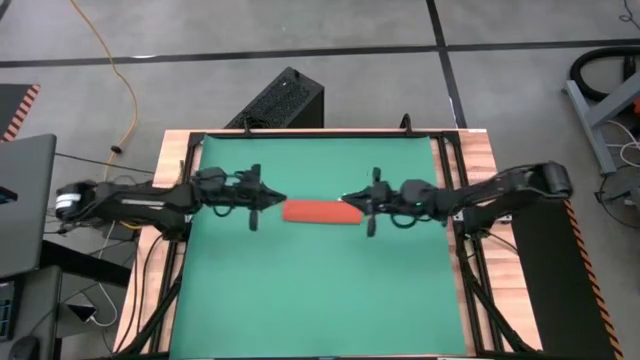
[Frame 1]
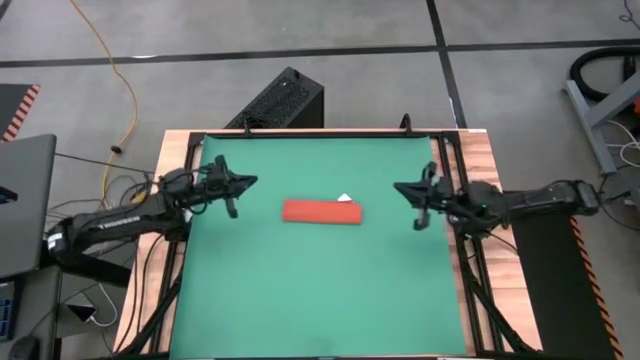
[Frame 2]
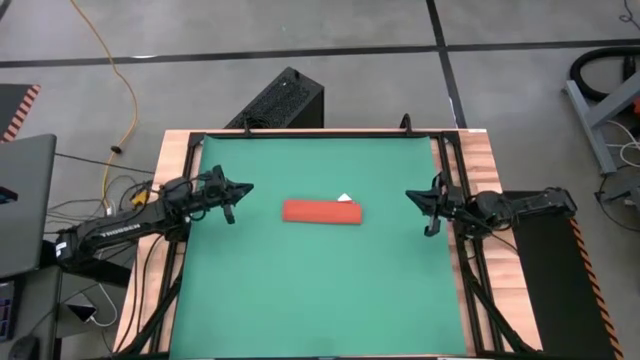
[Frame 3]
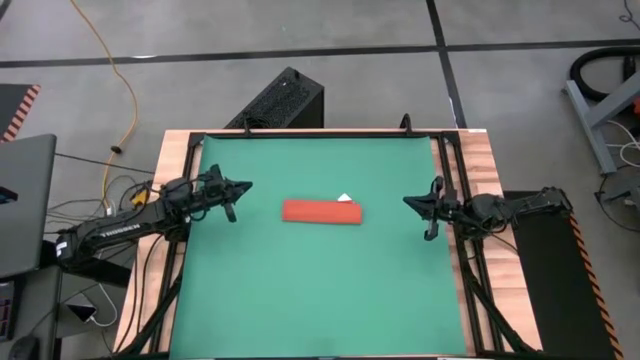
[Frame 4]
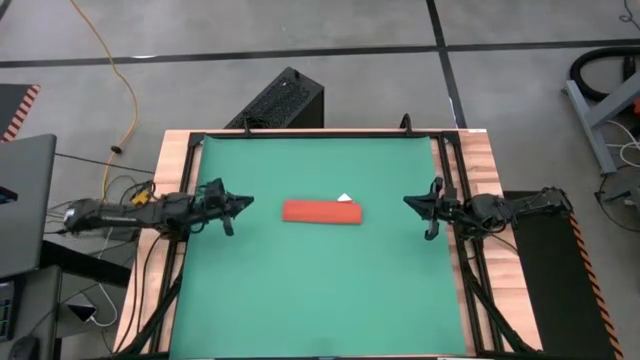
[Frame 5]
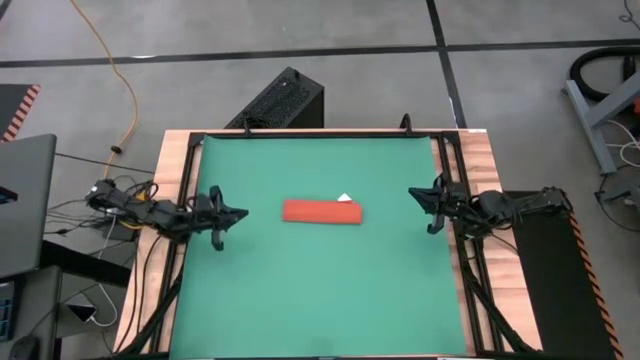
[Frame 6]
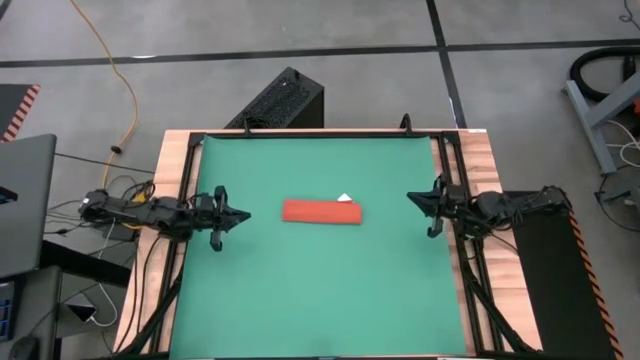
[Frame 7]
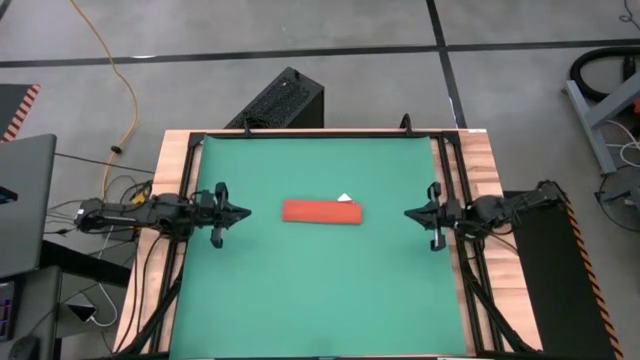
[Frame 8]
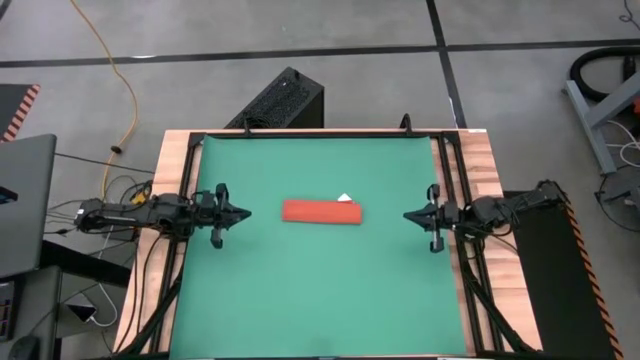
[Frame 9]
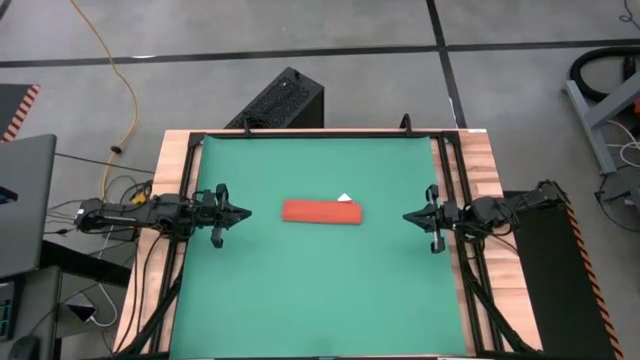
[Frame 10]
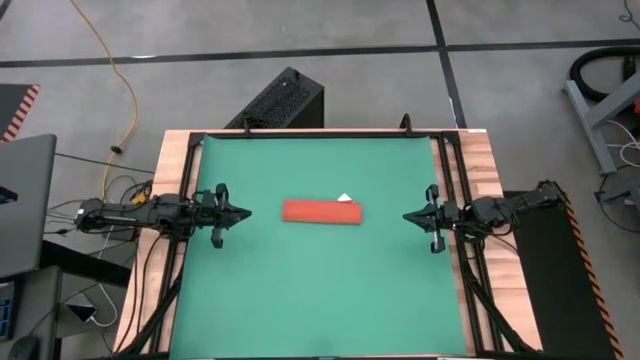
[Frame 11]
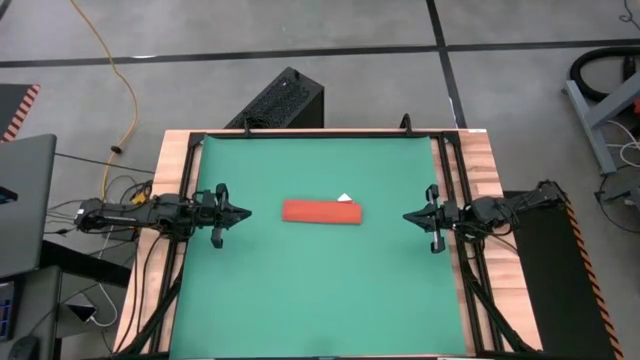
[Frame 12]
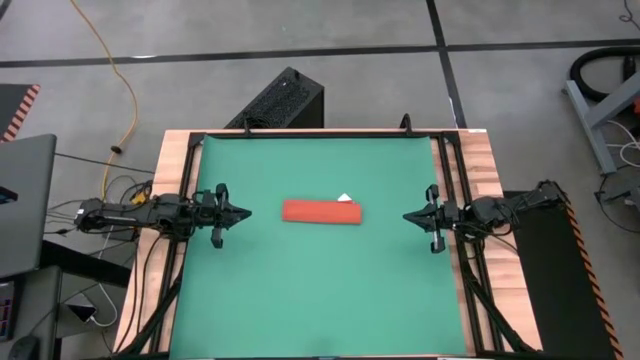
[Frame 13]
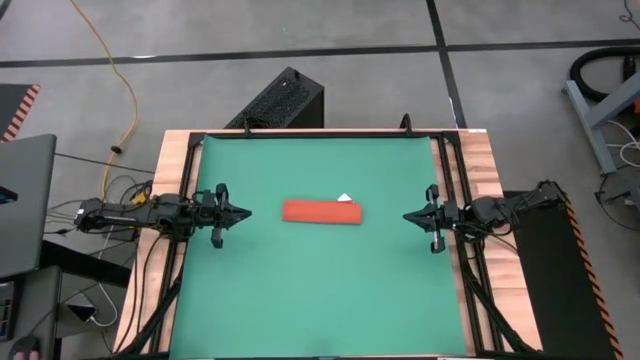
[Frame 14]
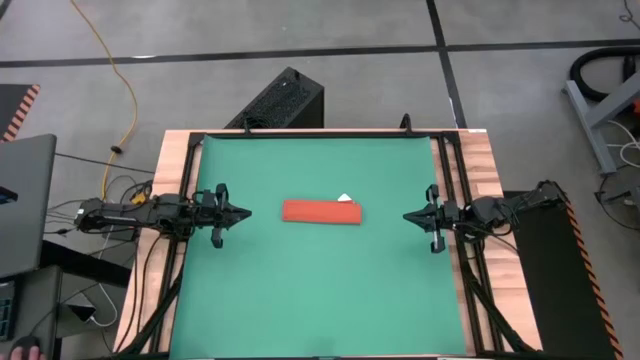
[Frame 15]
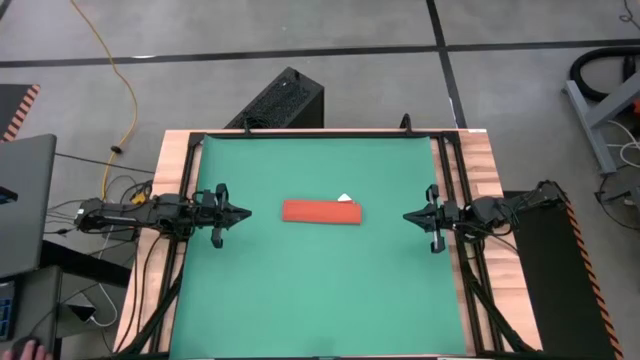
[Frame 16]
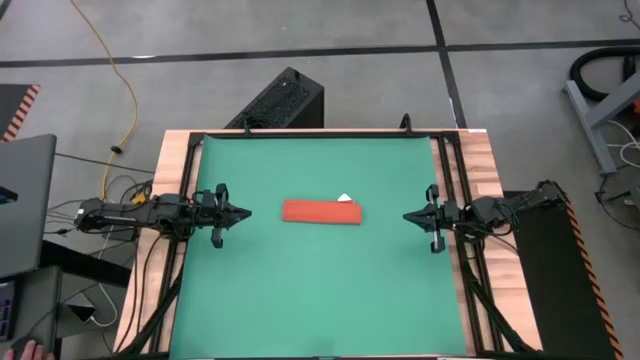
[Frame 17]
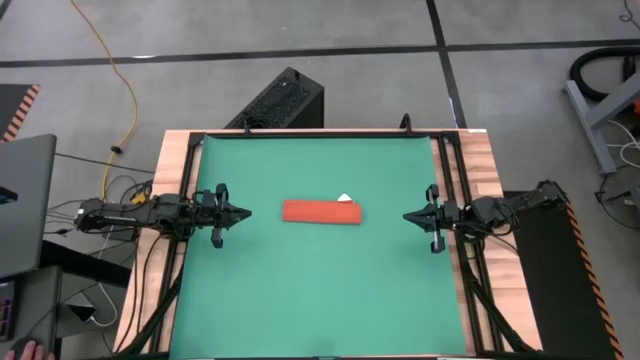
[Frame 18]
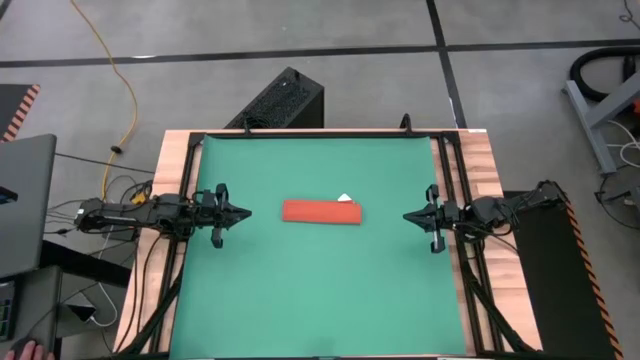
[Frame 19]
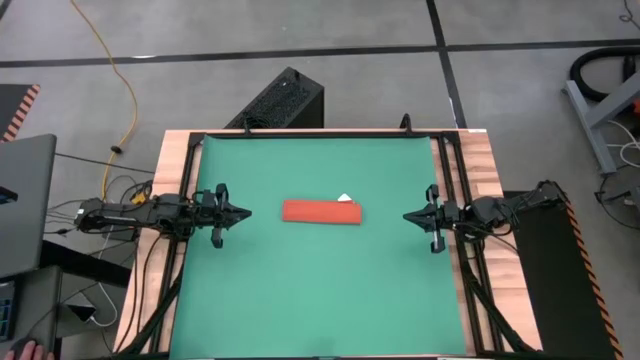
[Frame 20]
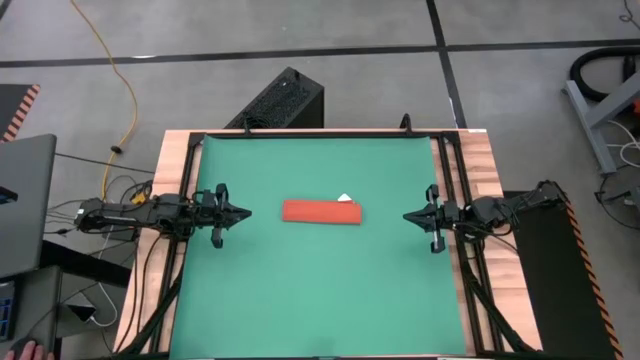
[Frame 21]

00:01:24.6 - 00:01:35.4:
Task: Roll towel into tight, uniform cylinder
Return to Home Position

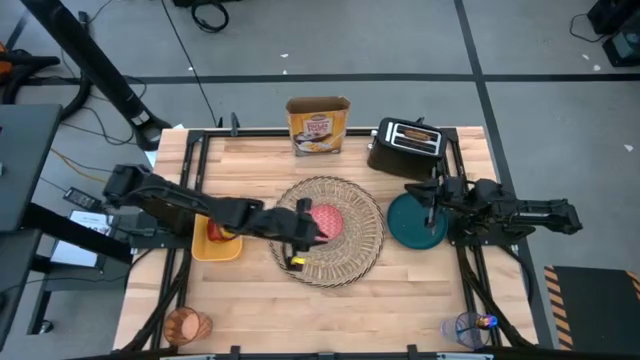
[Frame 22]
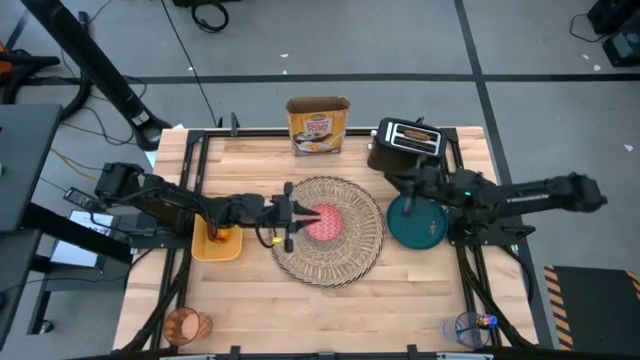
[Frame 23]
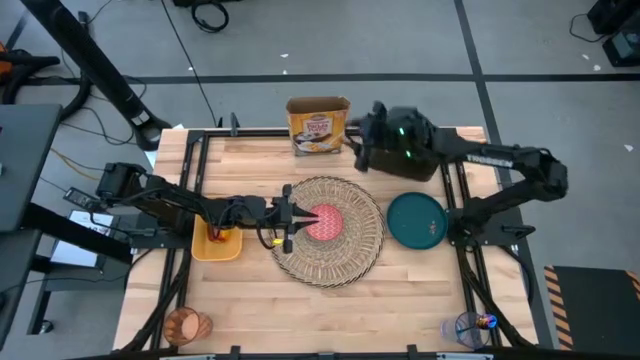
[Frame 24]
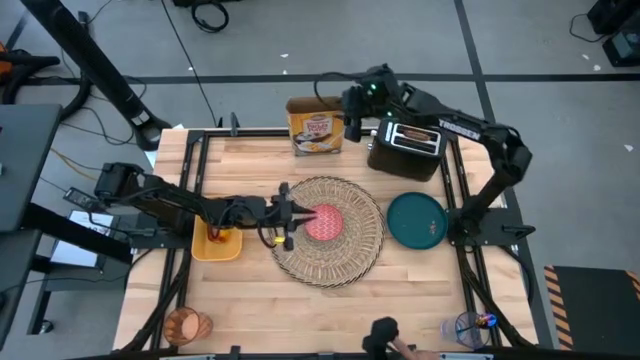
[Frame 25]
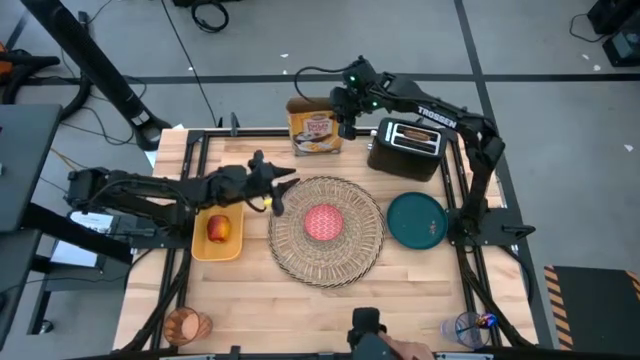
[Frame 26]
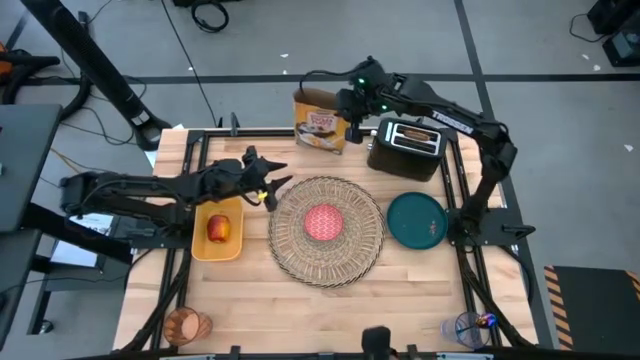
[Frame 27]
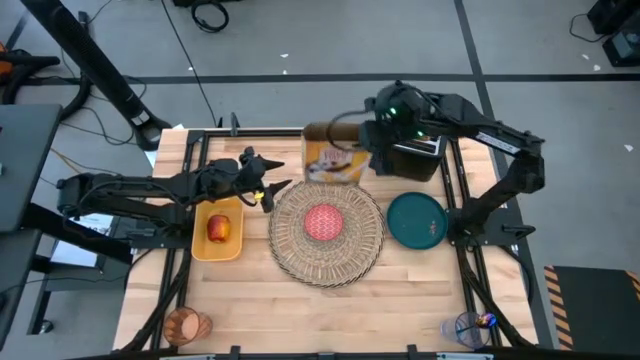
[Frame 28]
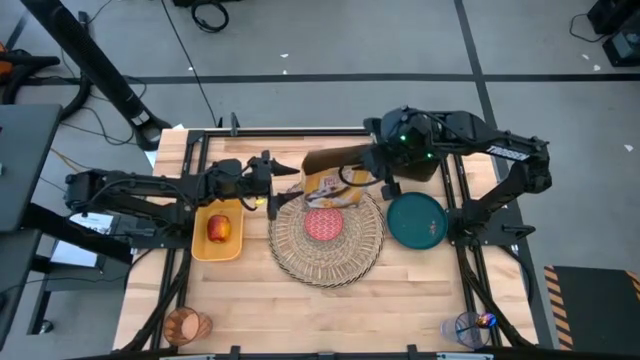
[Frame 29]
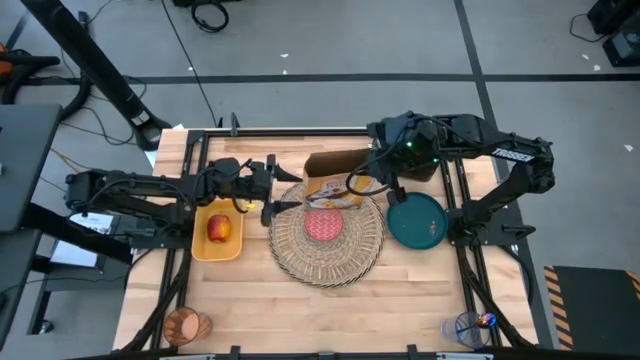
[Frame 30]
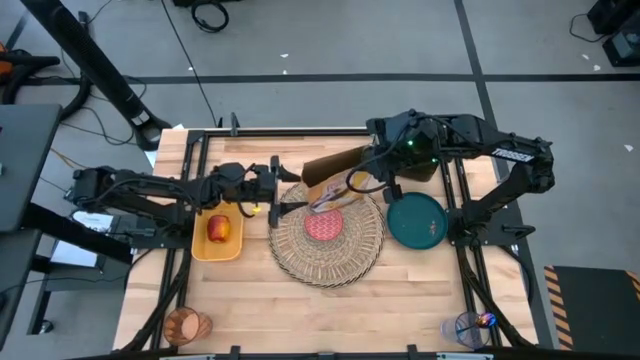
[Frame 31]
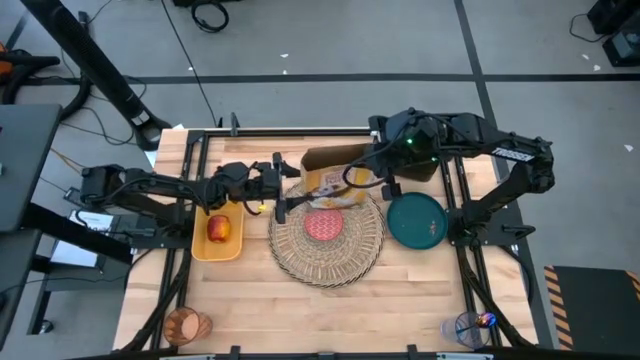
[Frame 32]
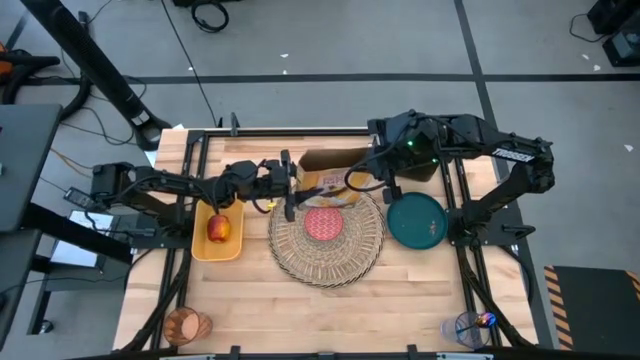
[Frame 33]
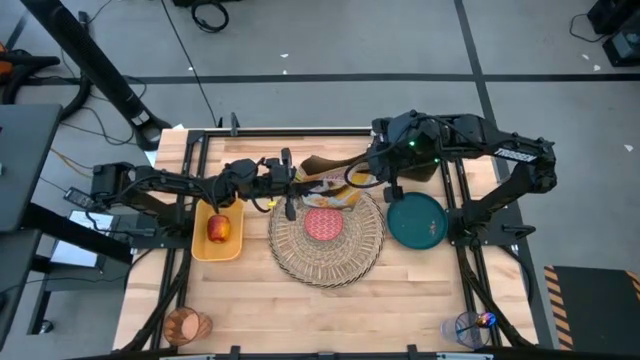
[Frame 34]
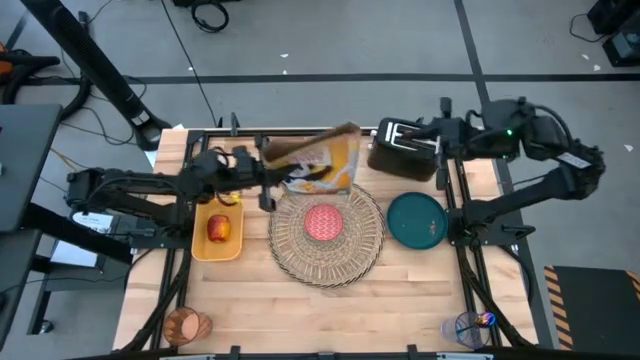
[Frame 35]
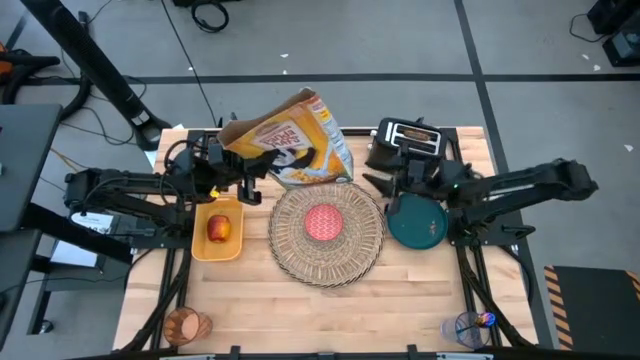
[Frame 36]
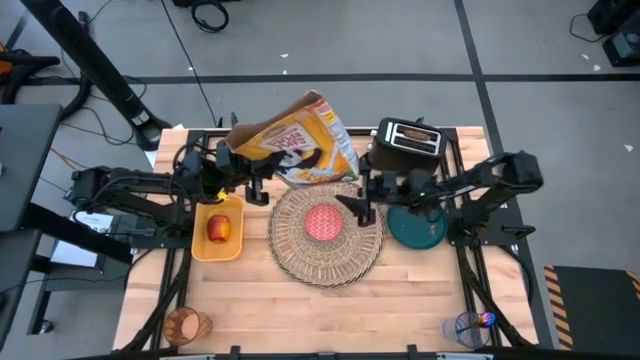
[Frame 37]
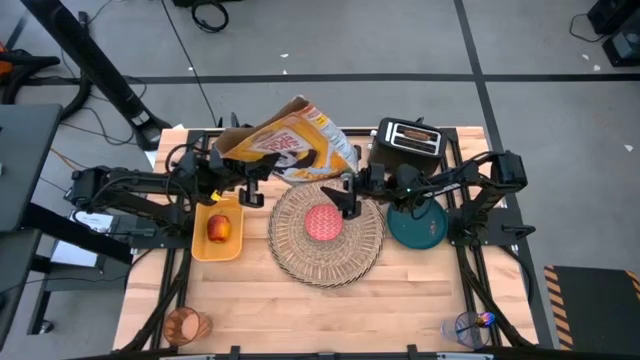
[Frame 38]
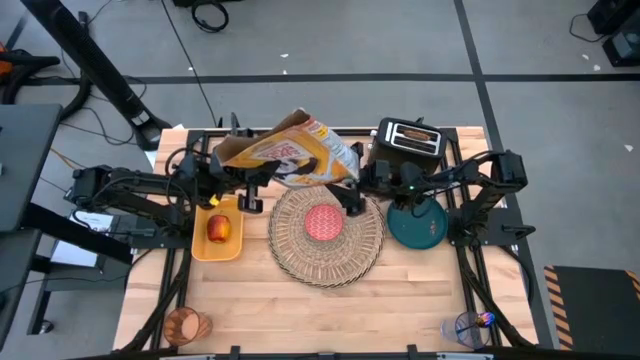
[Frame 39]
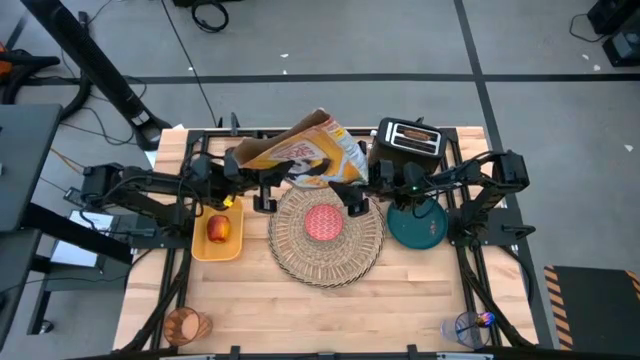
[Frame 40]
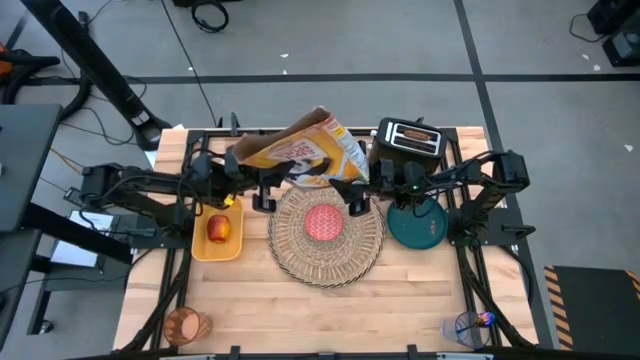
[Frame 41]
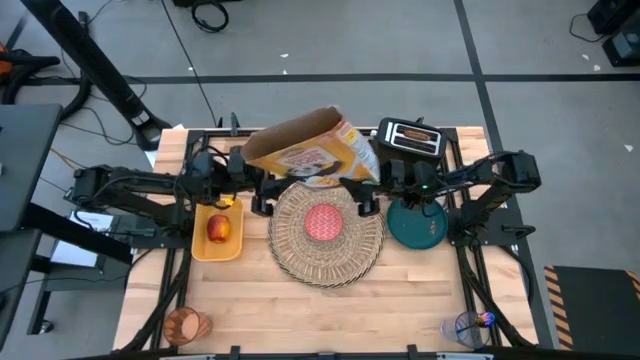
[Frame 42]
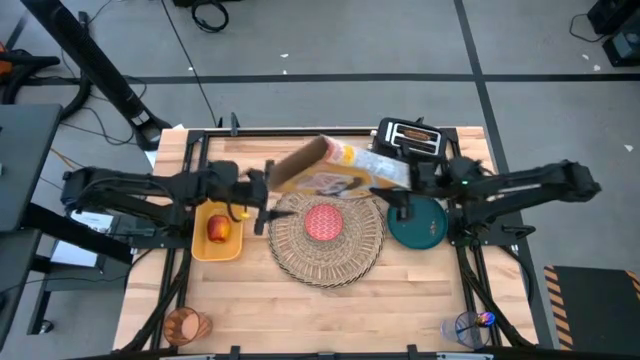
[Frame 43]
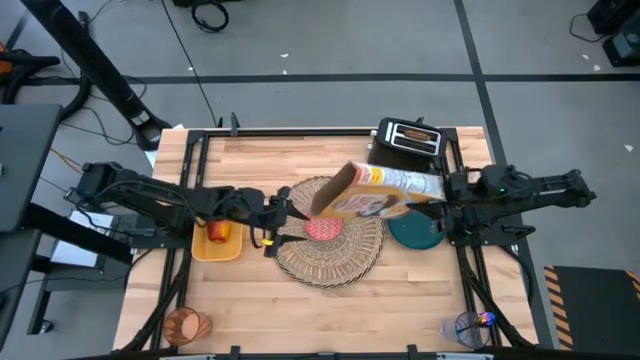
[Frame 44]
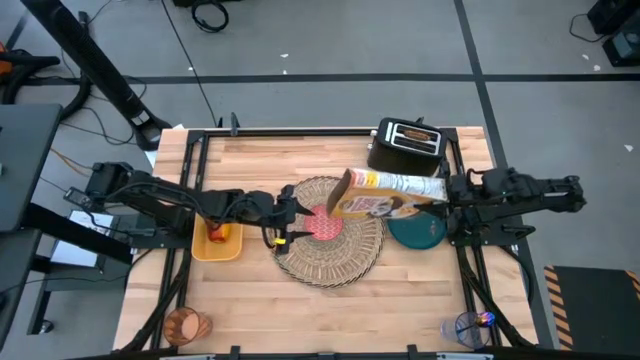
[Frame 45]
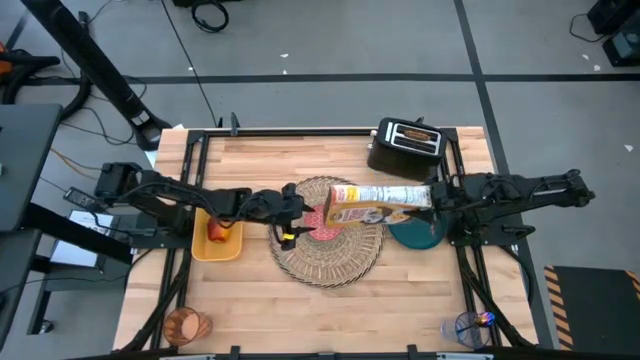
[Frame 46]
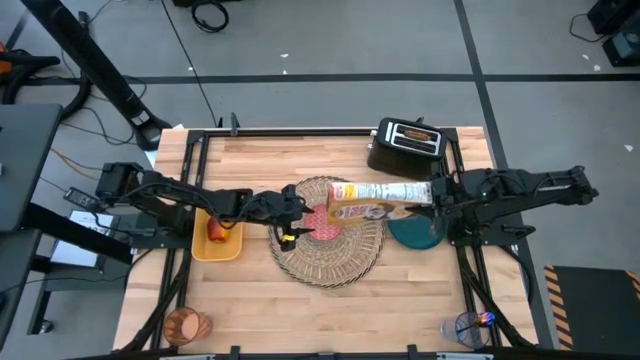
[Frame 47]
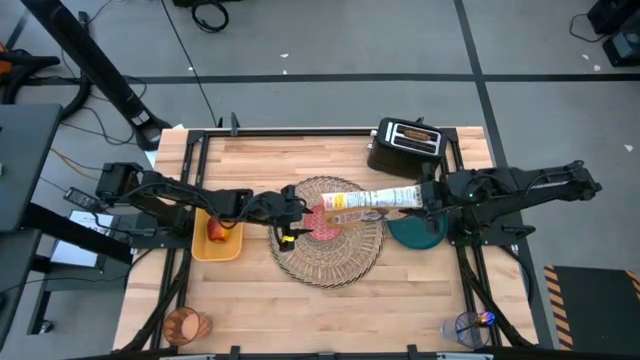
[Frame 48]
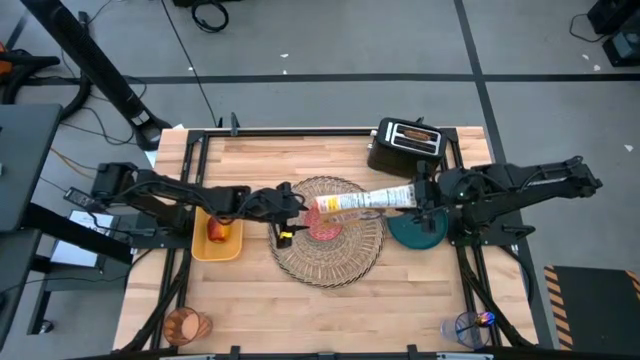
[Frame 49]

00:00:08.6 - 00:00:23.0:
Task: Arrange a breakfast setting
Pour the cereal from the yellow cereal box into the red bowl on the brown table mat
